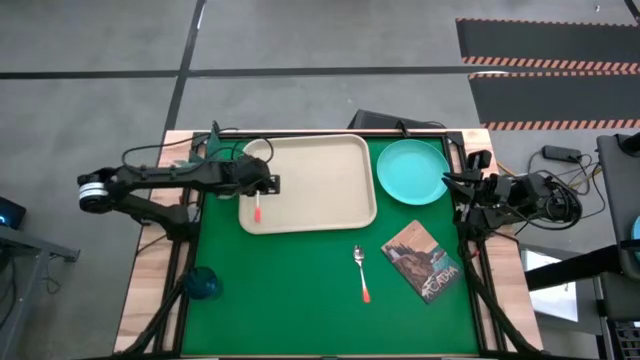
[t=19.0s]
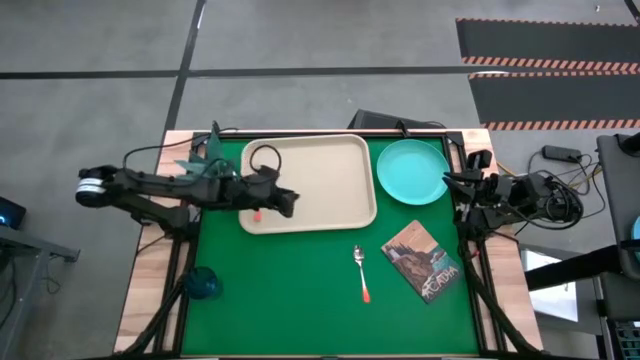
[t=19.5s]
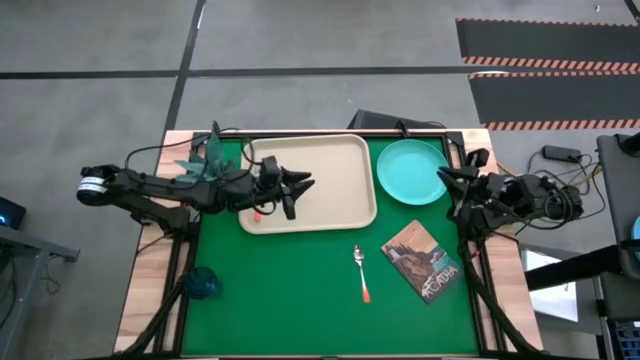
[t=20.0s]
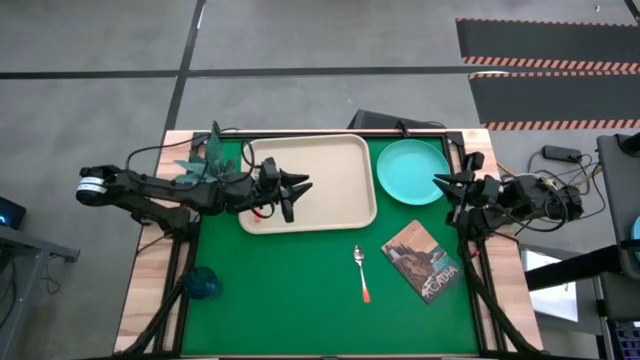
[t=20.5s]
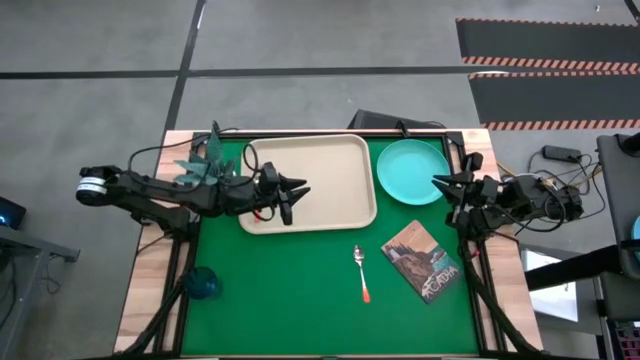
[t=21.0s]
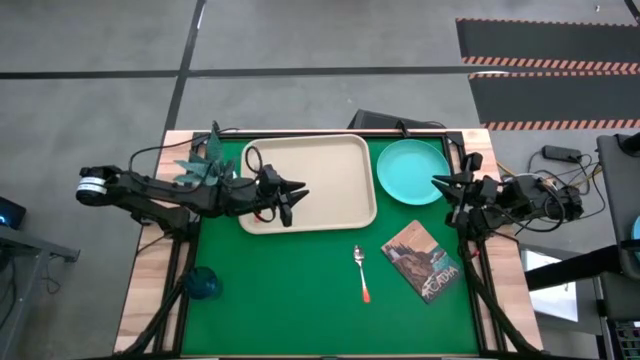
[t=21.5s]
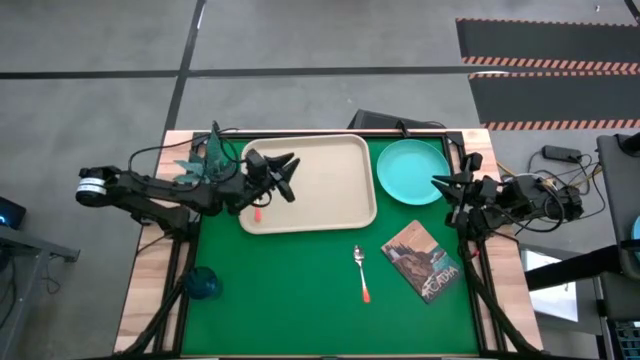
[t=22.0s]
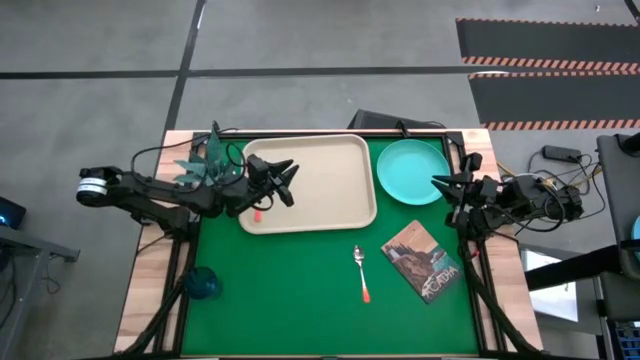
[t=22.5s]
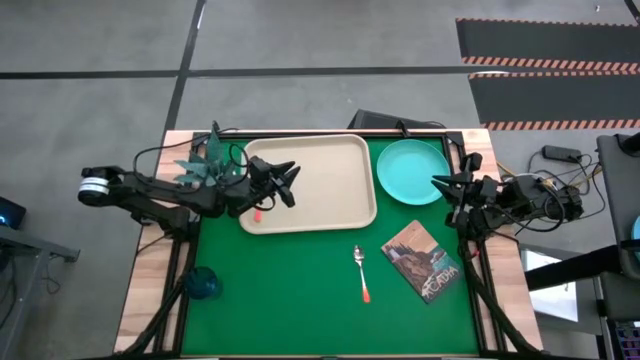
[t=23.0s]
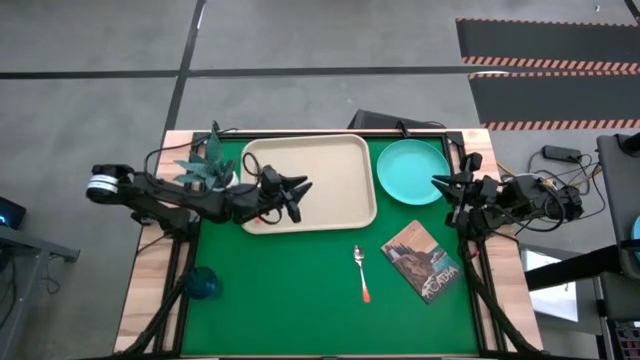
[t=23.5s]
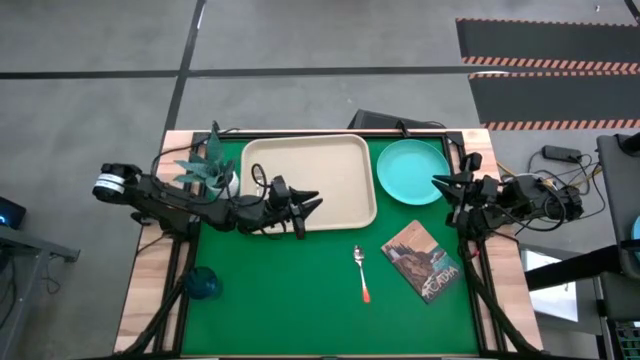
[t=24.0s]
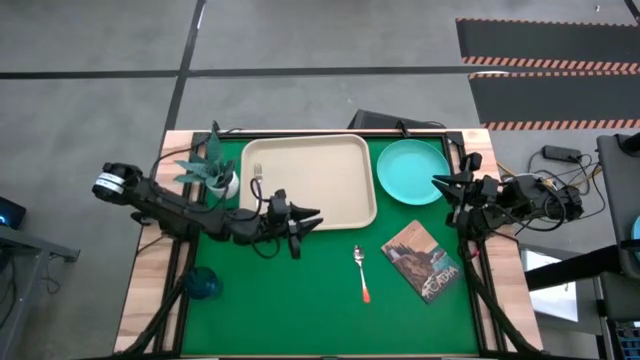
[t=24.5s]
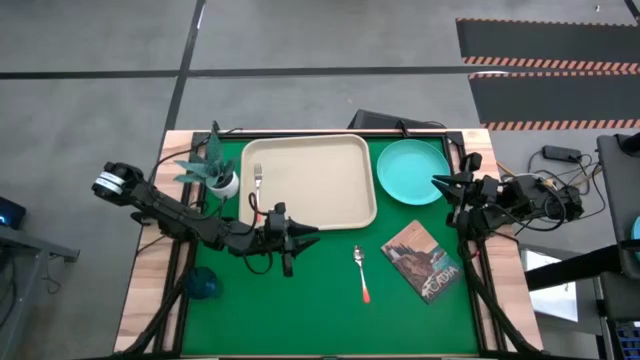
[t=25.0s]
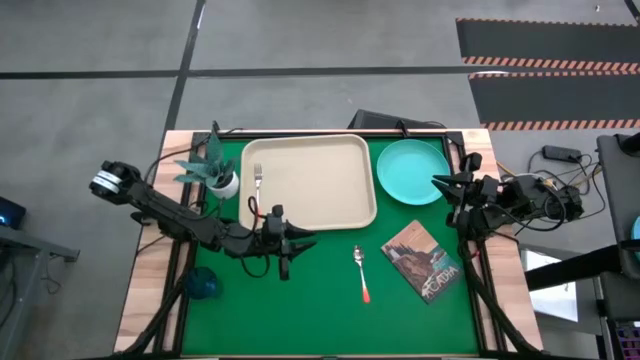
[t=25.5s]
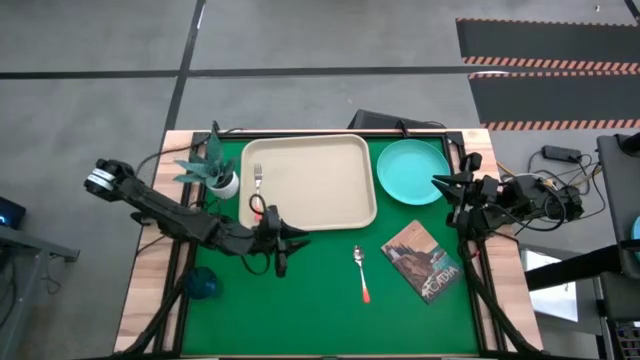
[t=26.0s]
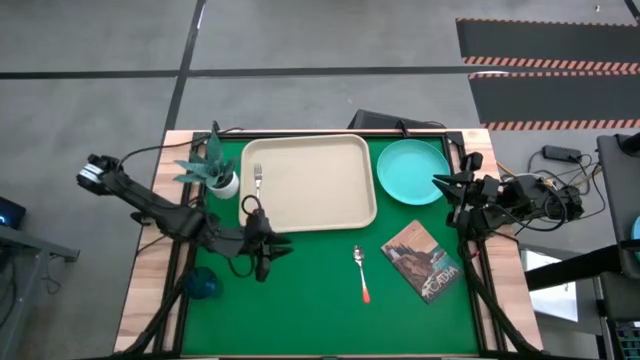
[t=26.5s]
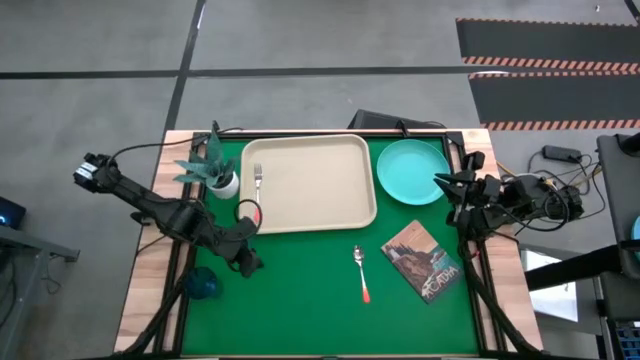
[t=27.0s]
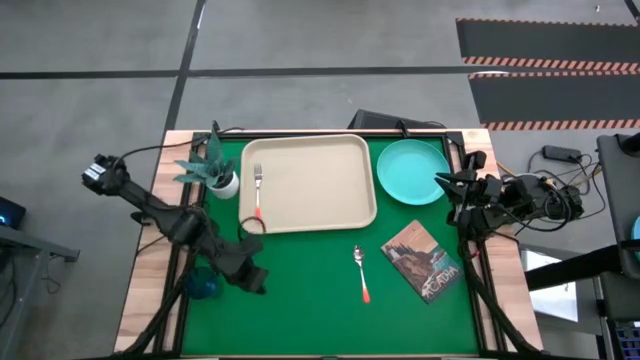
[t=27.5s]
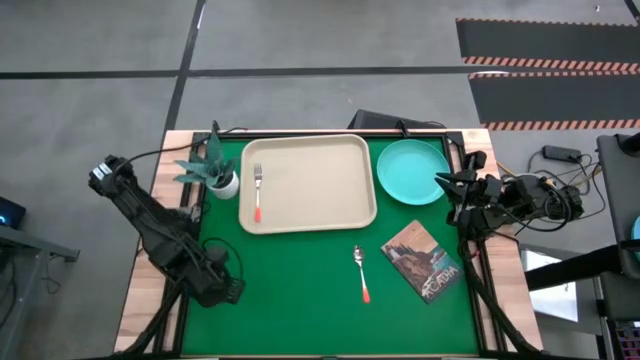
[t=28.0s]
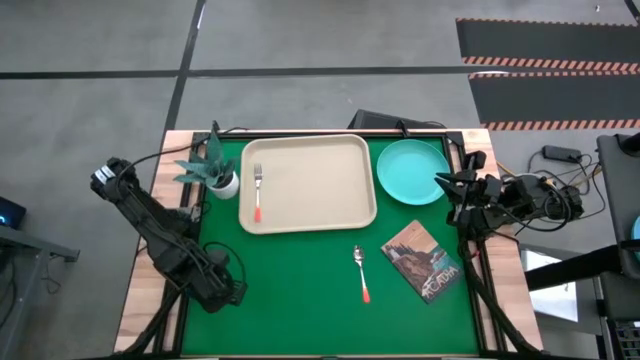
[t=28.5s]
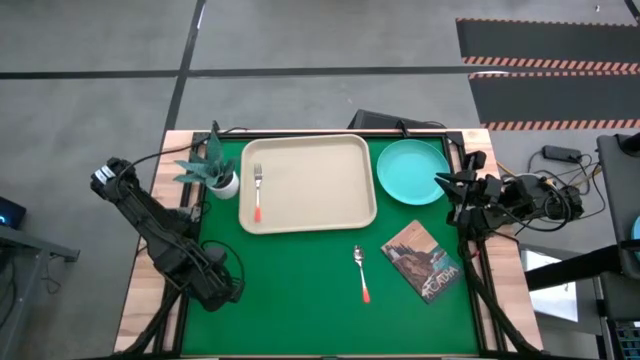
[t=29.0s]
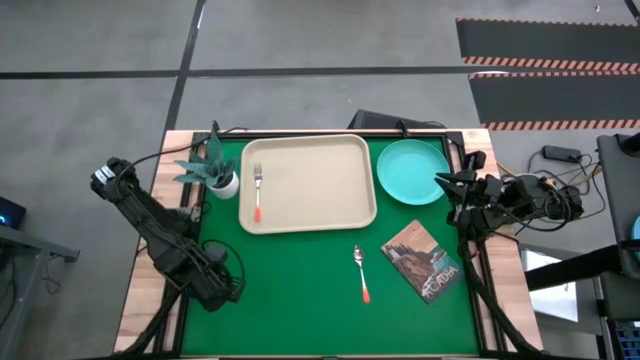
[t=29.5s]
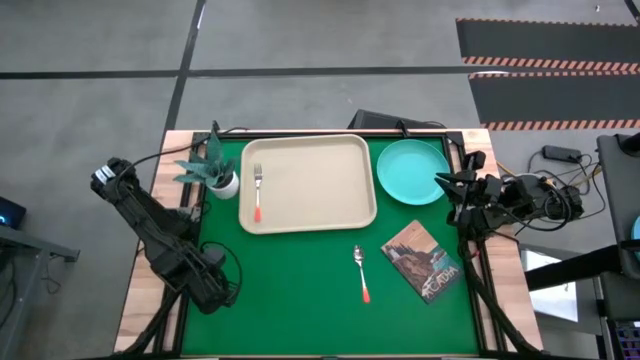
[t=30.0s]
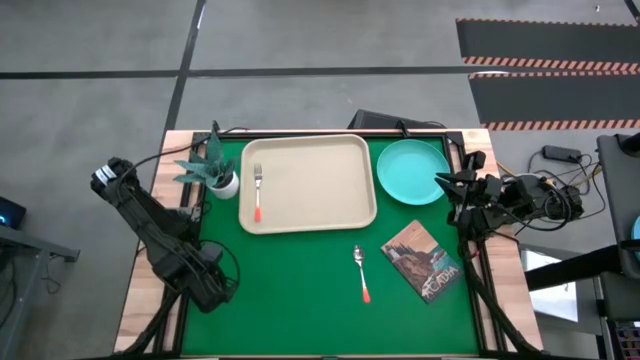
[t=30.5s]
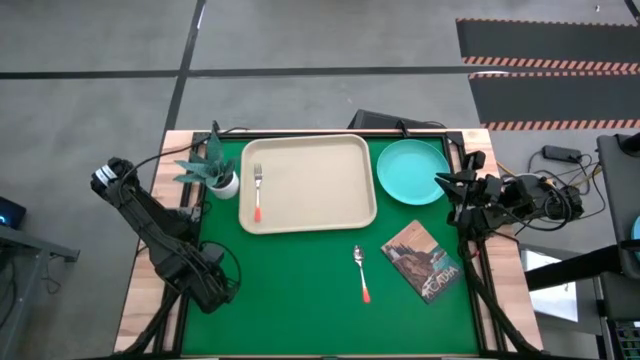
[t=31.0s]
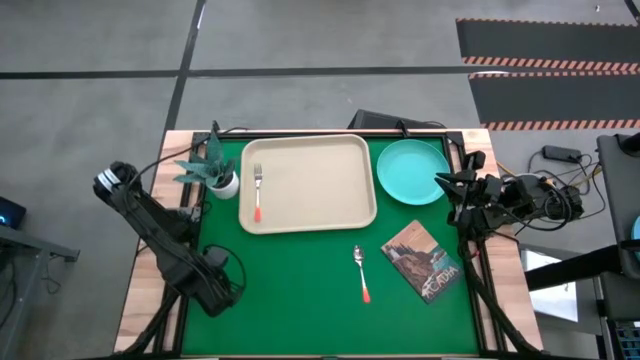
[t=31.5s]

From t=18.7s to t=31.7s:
Task: Pick and place plate/cup/fork/spoon on tray
Put the blue cup on the white tray

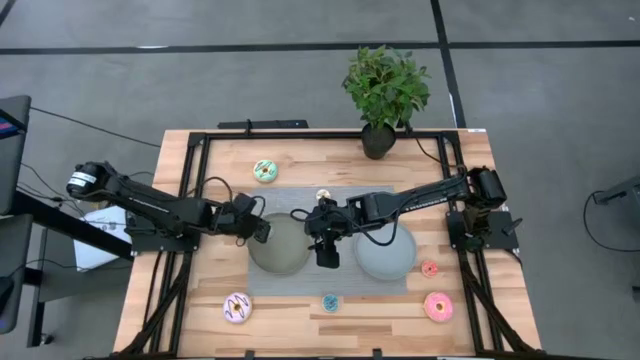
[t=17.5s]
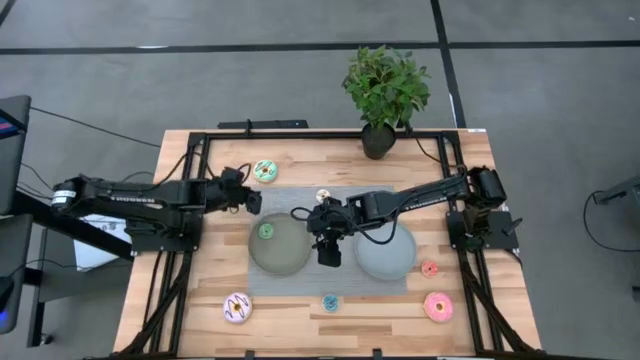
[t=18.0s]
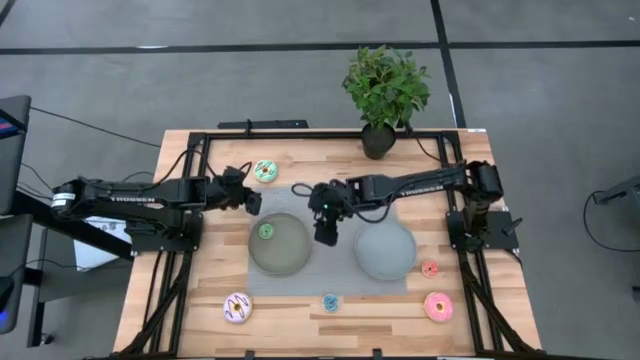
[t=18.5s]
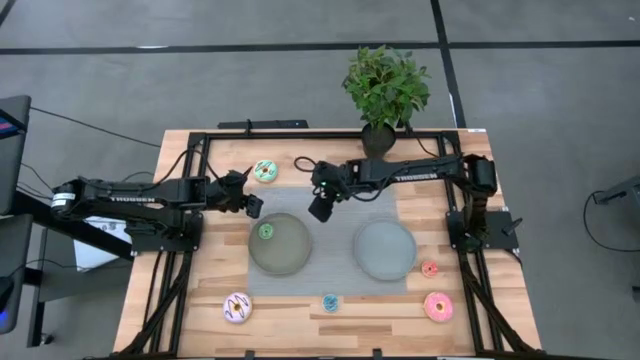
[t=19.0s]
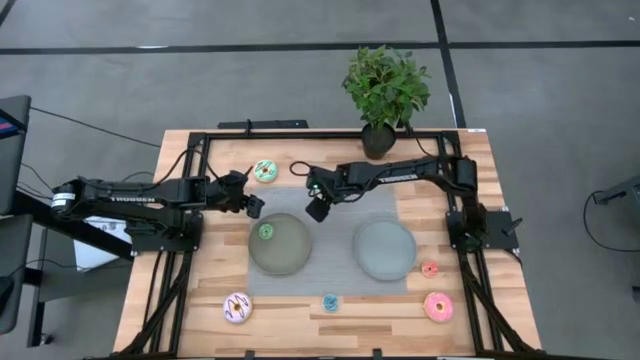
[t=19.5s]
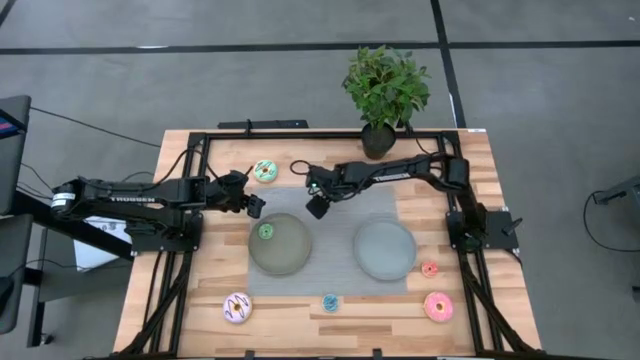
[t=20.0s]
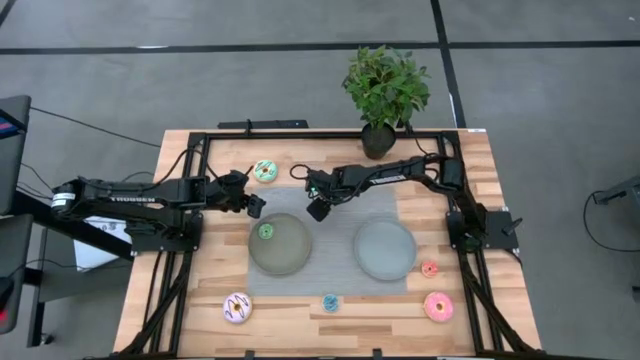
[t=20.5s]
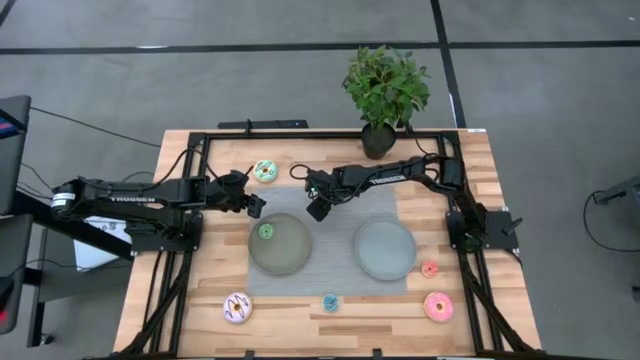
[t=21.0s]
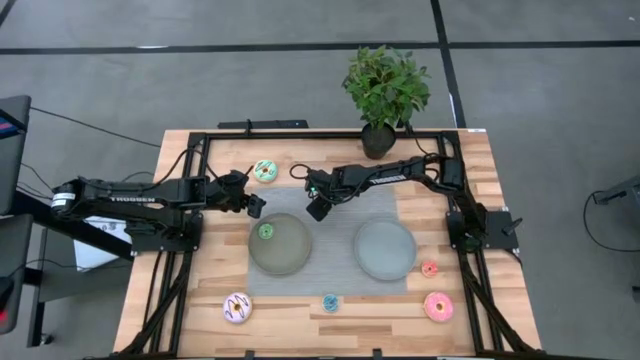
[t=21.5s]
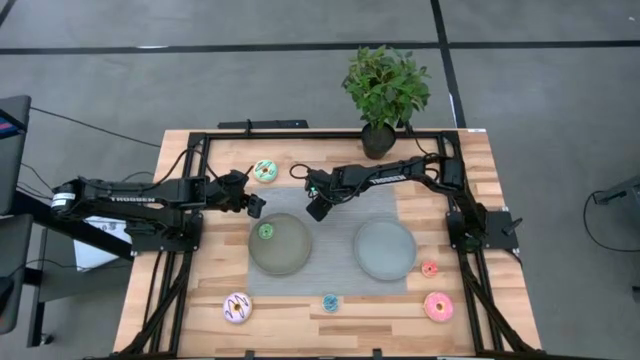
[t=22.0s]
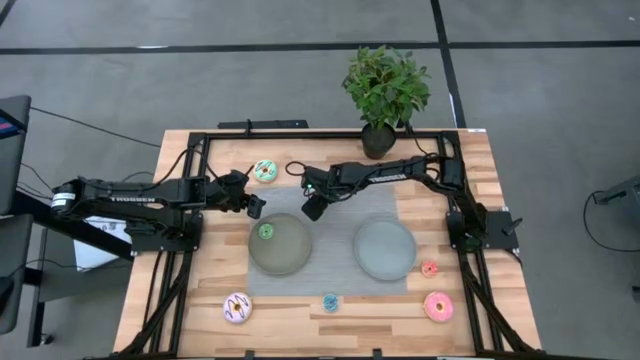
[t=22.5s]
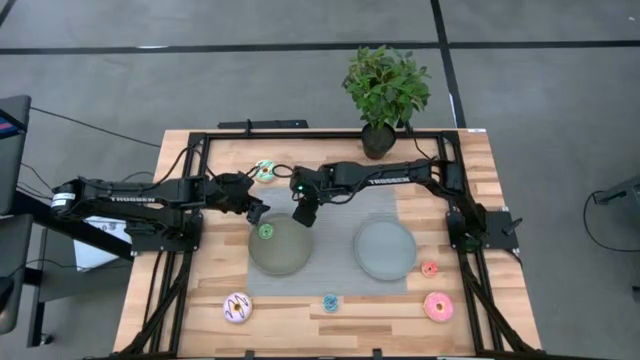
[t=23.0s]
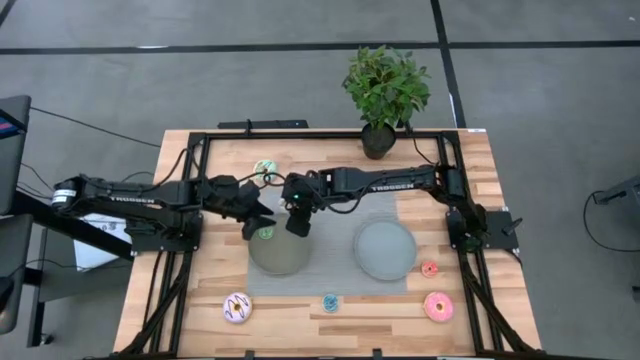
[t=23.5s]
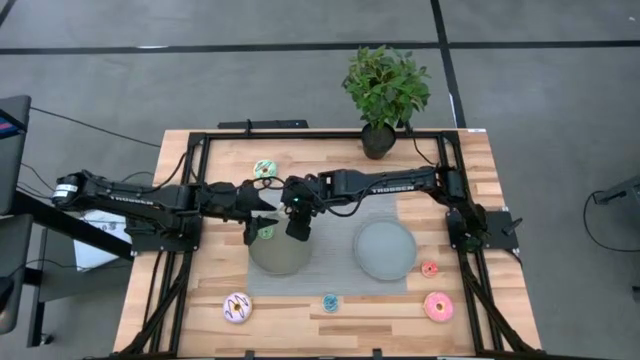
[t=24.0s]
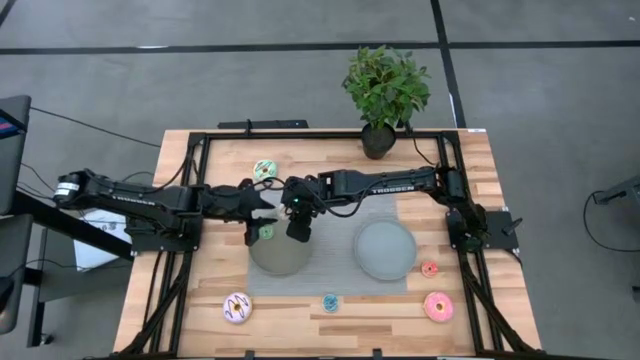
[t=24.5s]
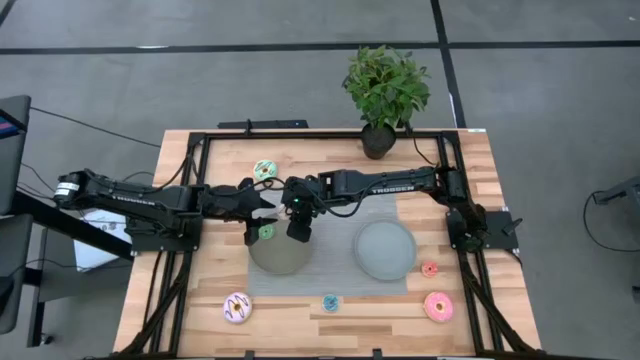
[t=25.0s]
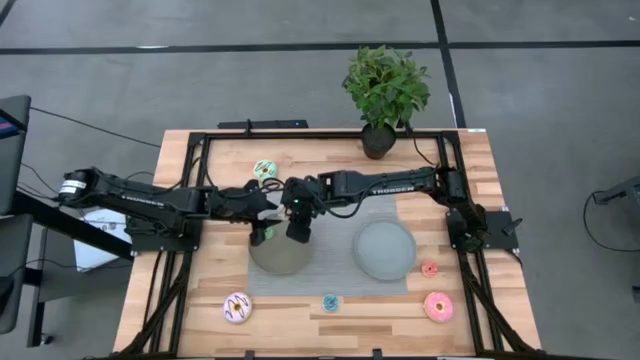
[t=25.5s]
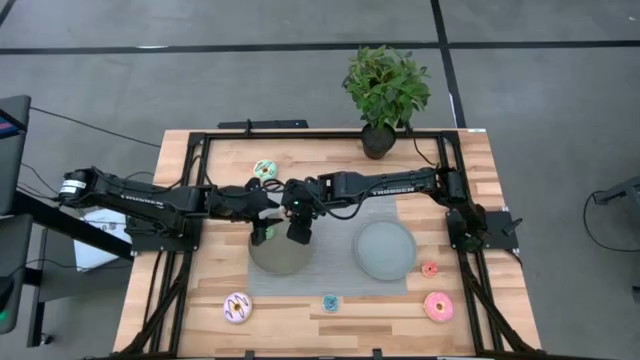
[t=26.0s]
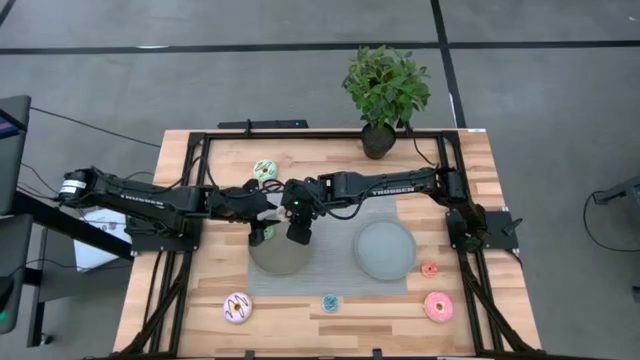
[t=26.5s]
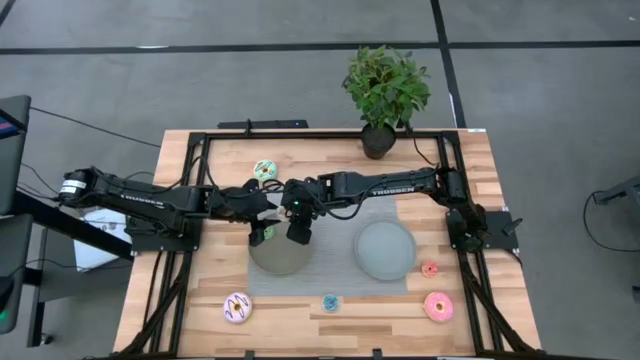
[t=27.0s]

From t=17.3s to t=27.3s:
Task: Pick & Place donuts
Put the small white donut on the dark gray plate
